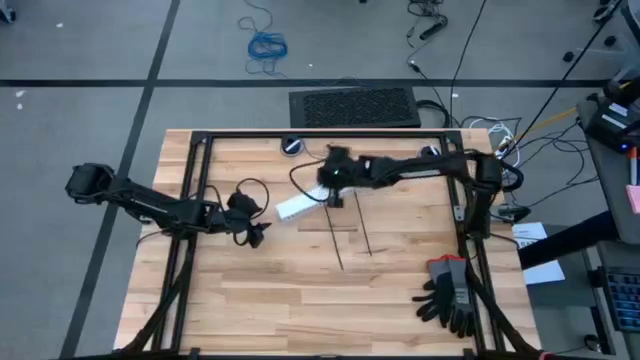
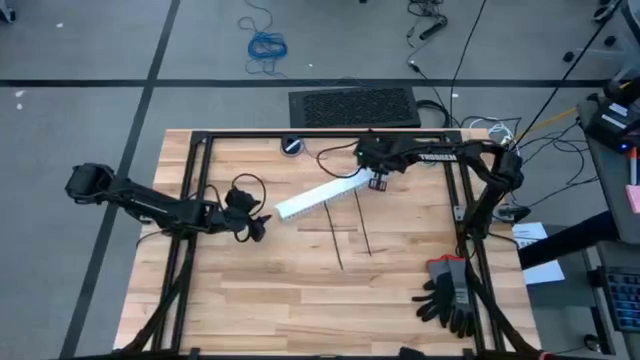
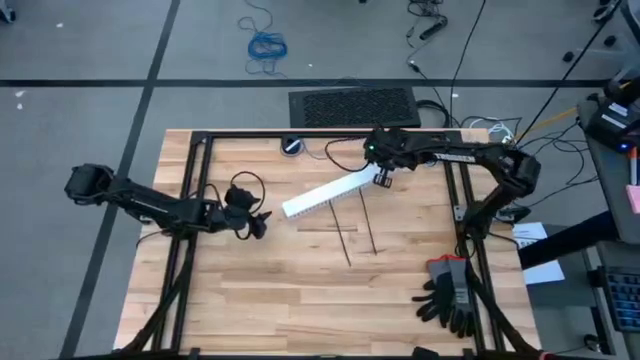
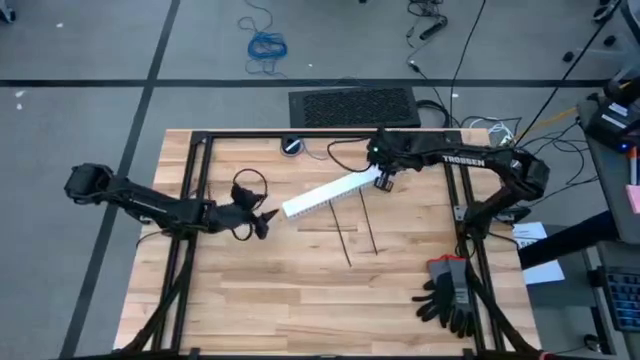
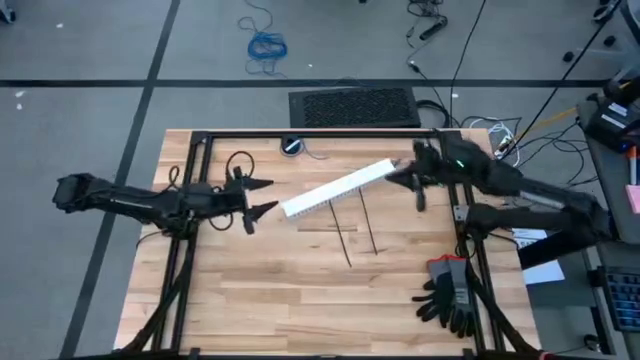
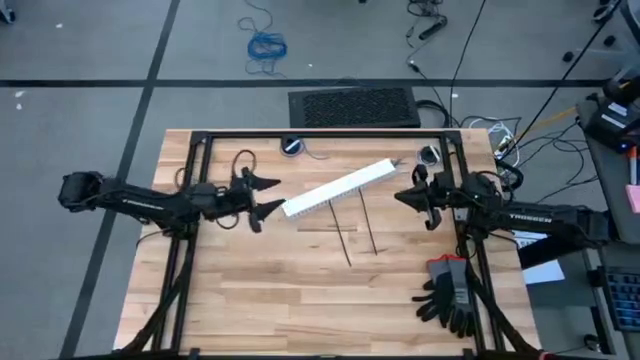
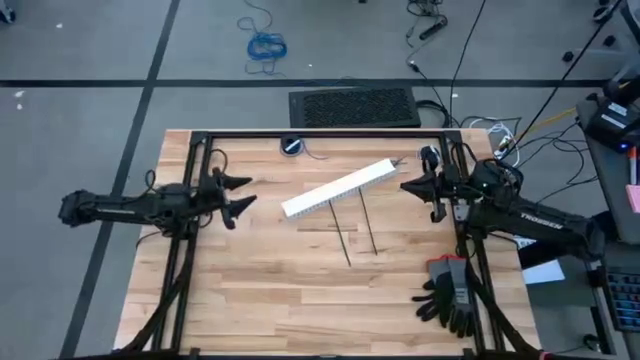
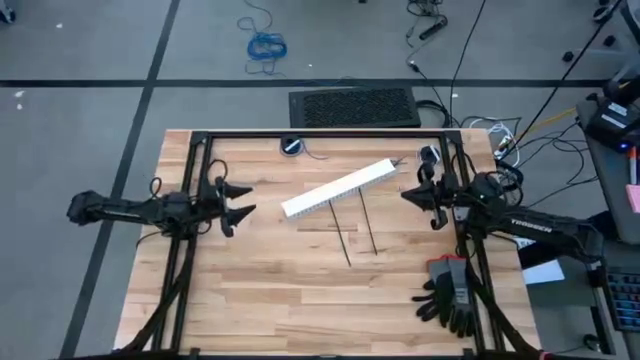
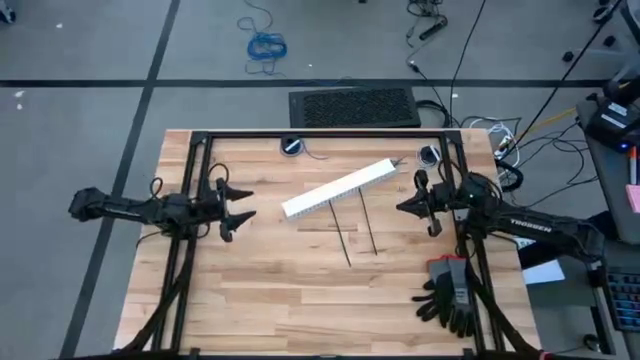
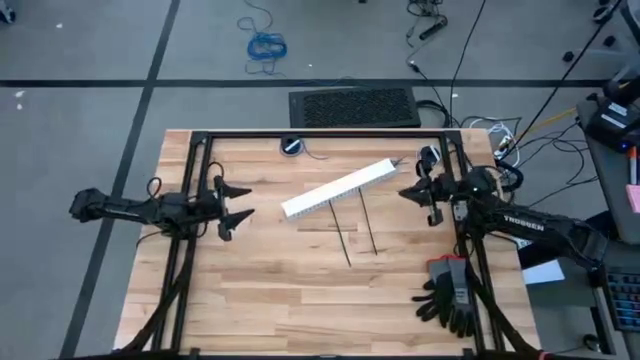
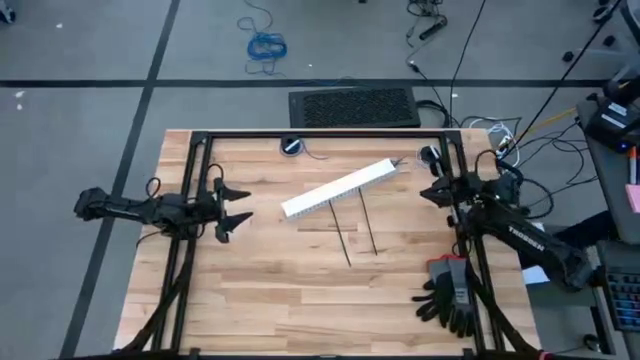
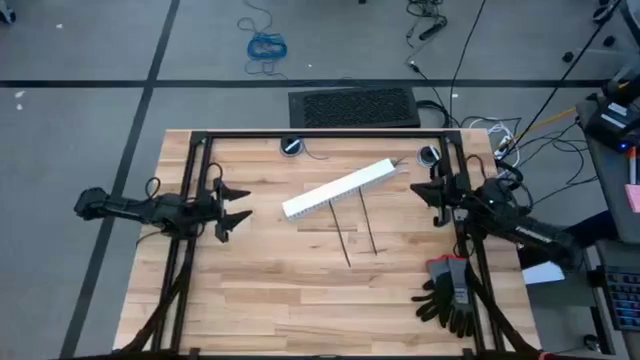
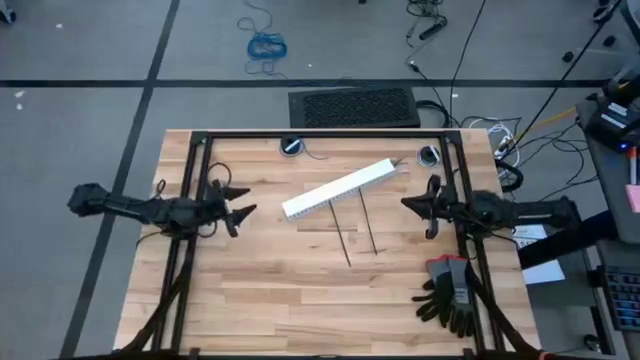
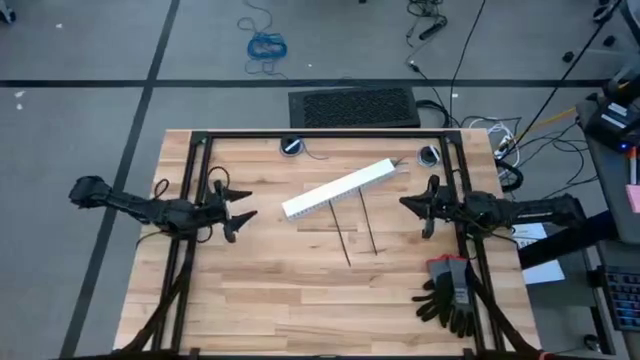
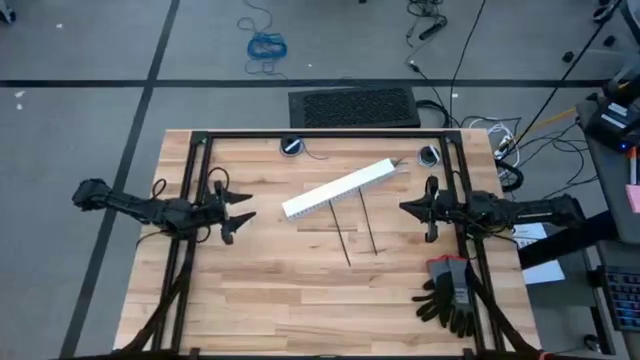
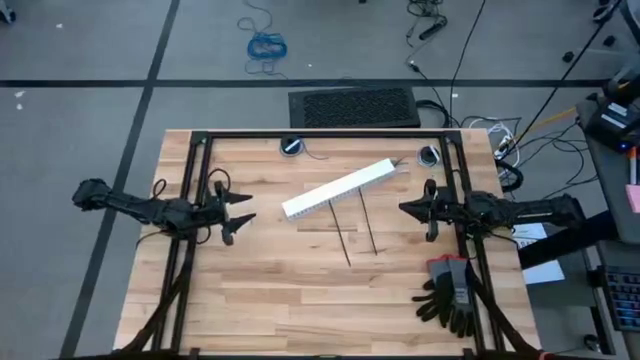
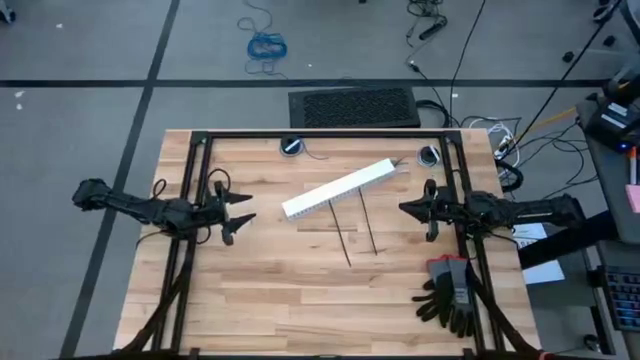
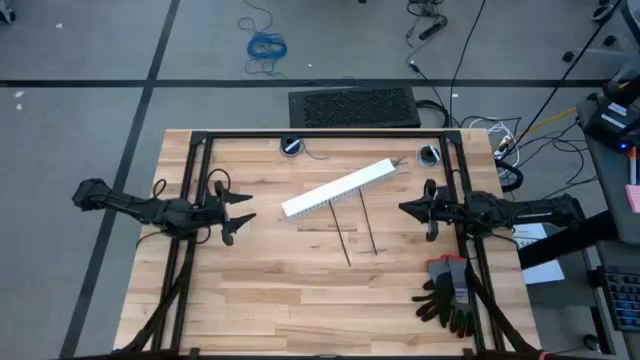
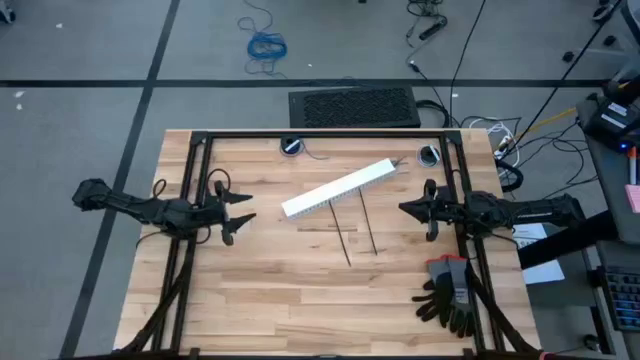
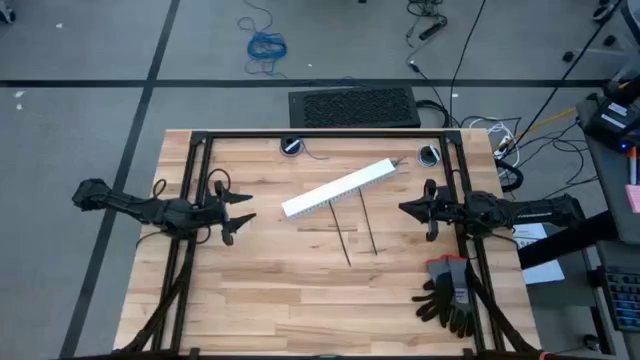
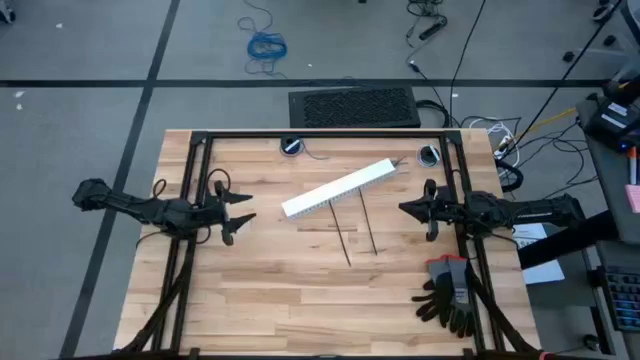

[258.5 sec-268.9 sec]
Task: Ziptie cables
Return to home position

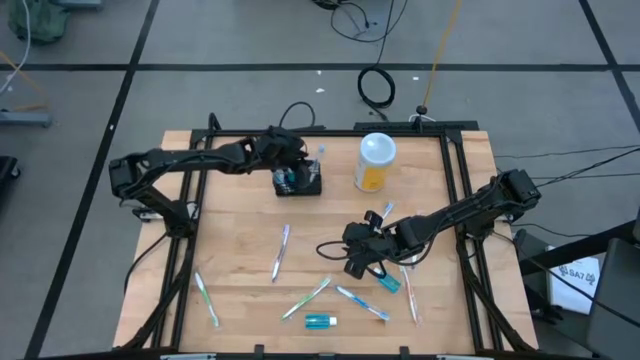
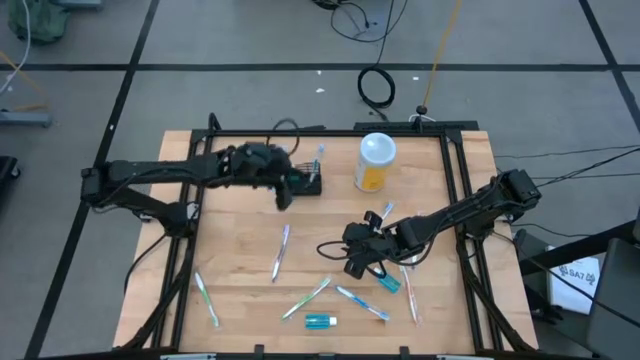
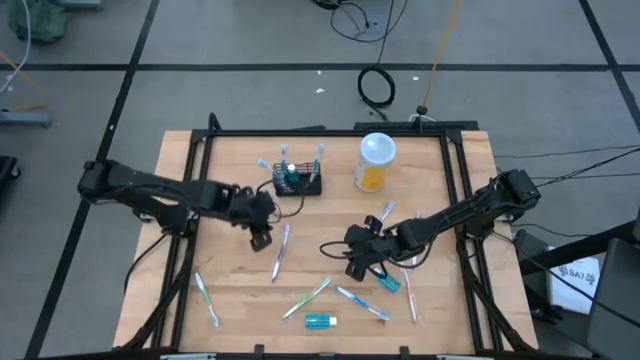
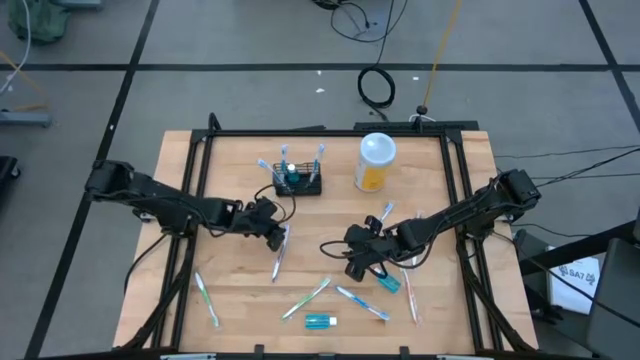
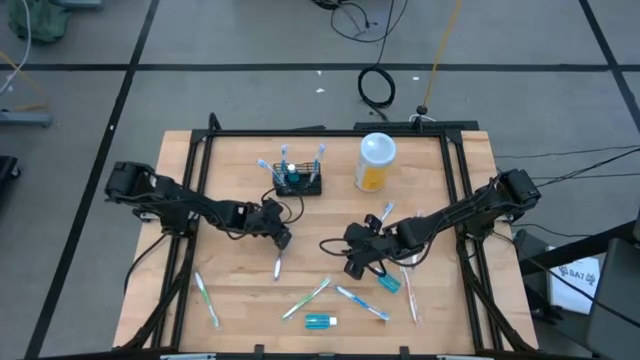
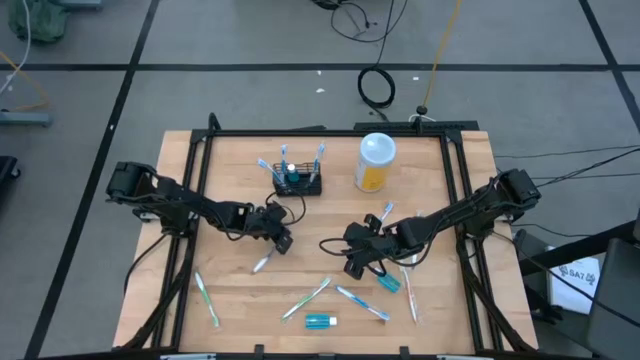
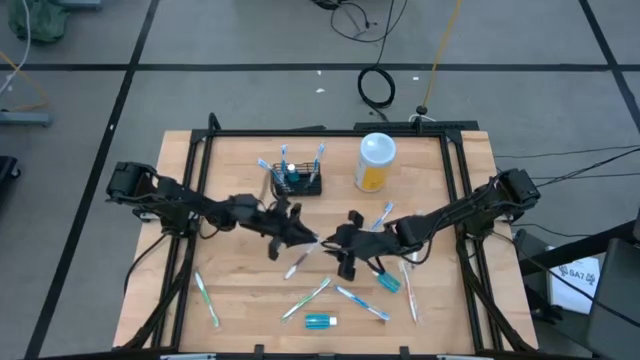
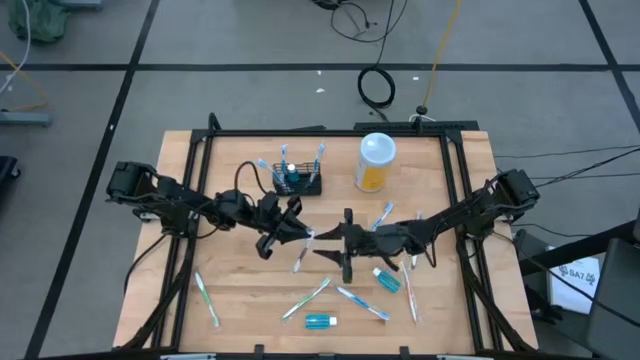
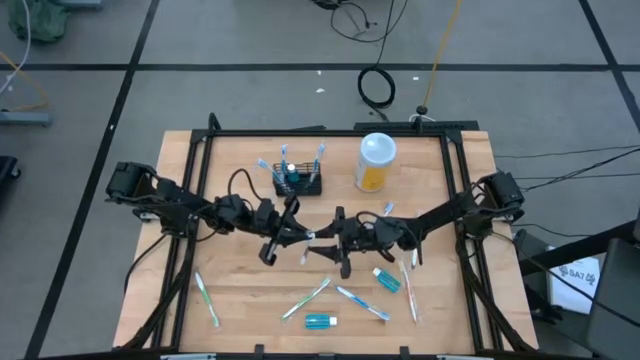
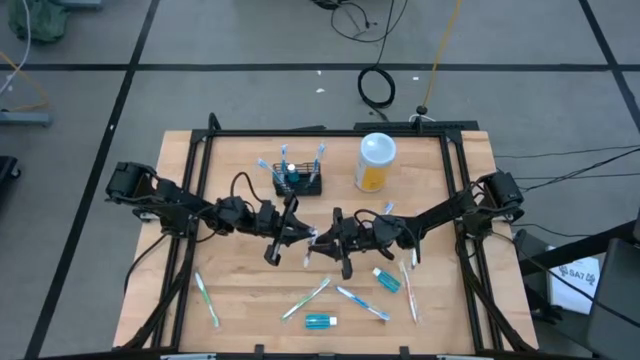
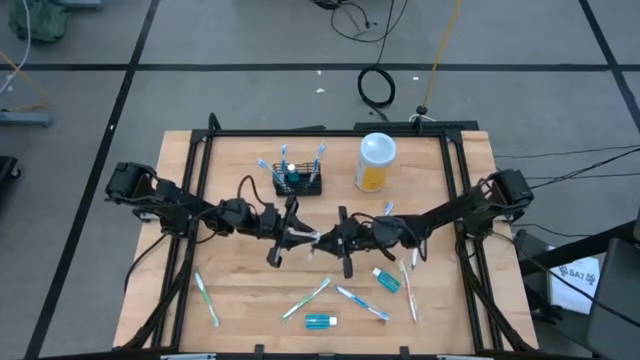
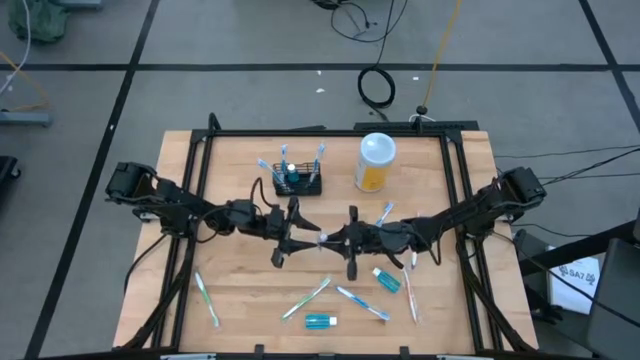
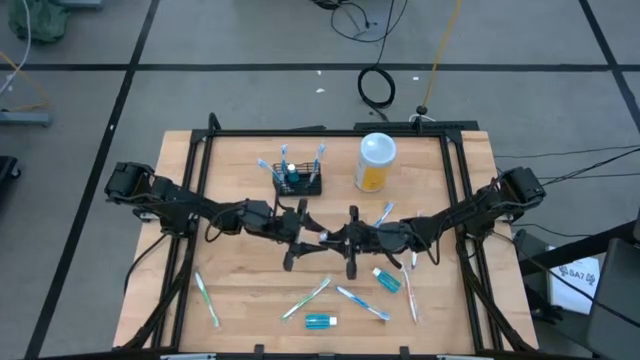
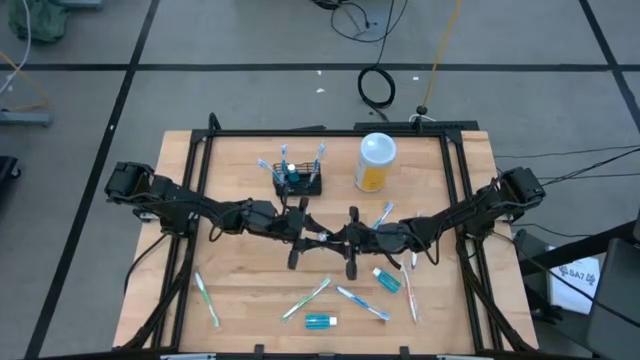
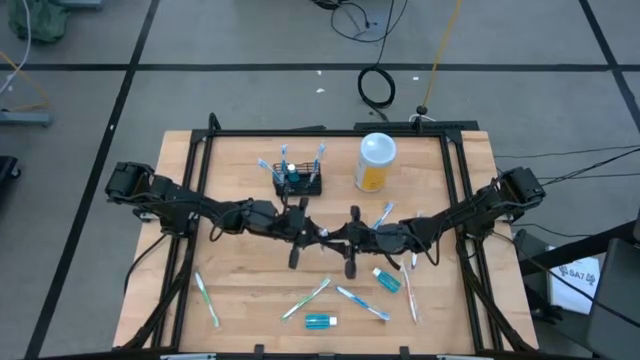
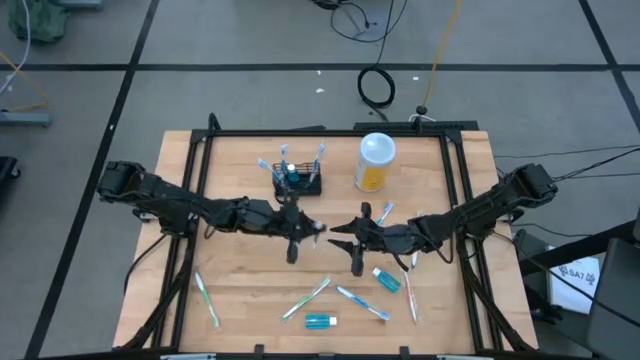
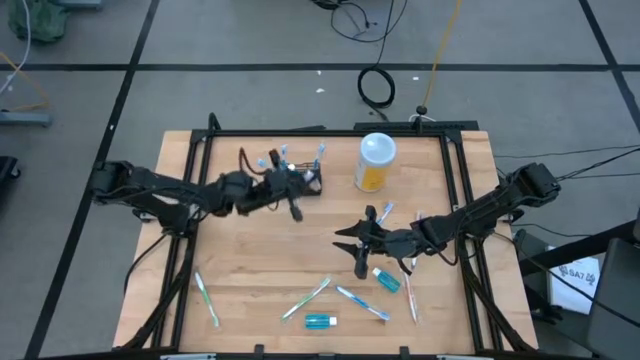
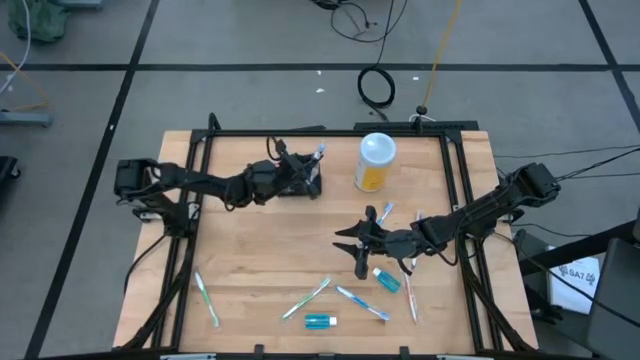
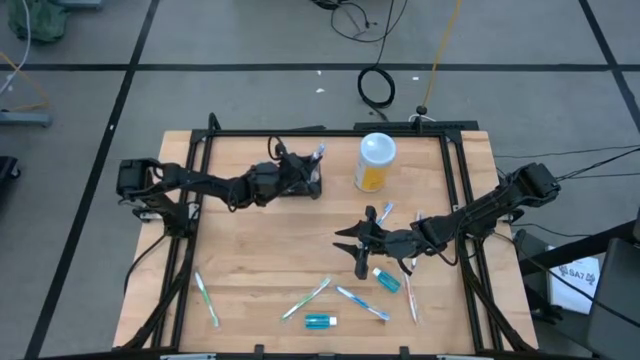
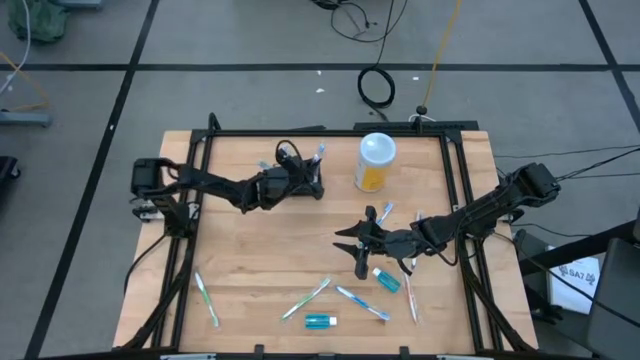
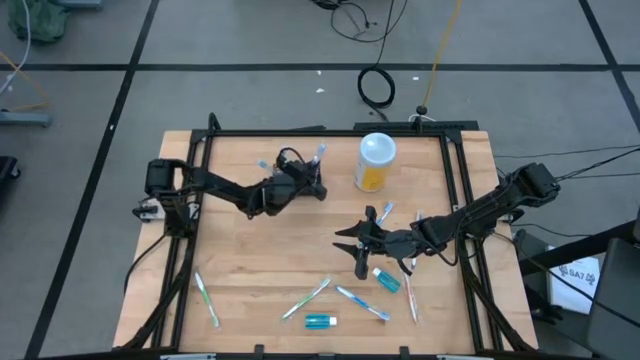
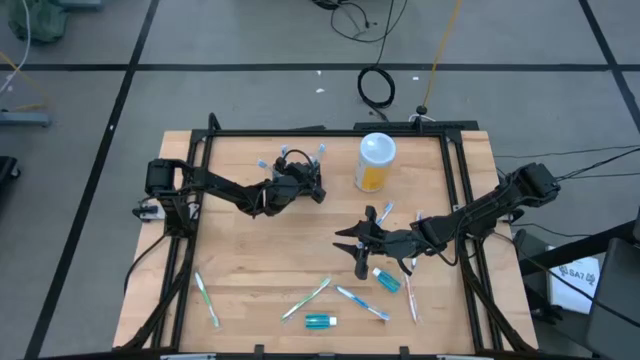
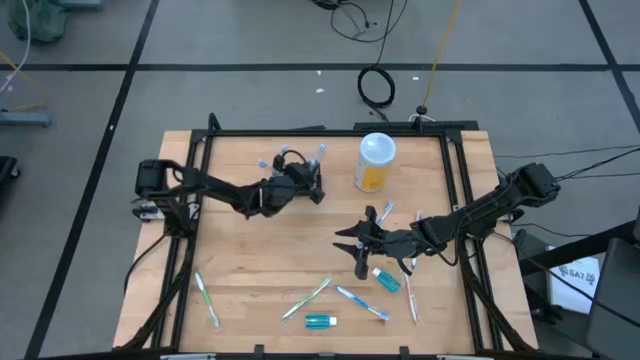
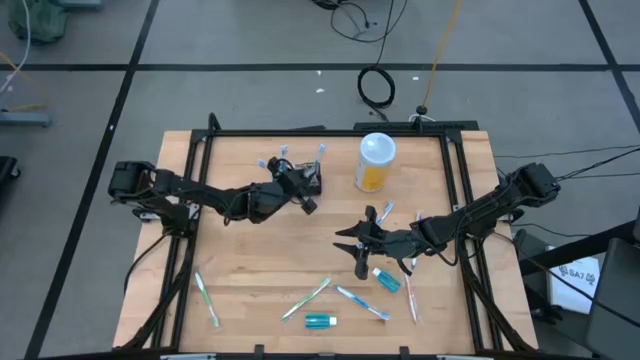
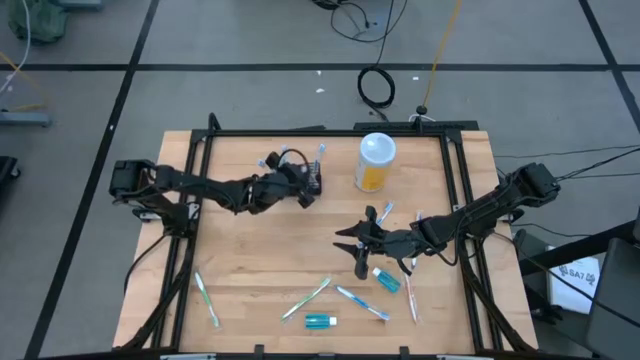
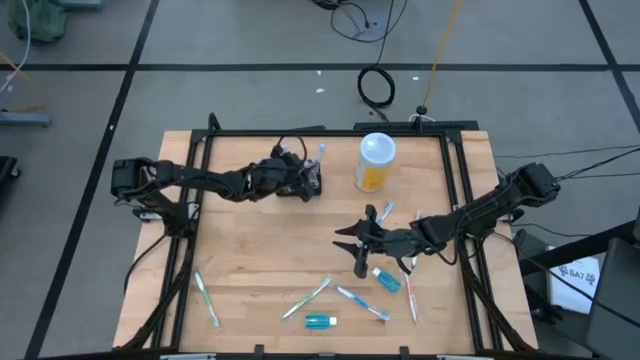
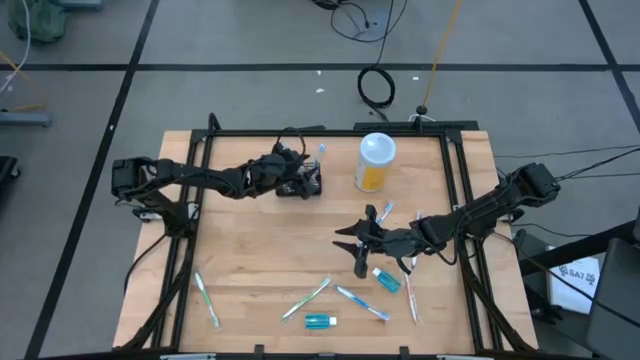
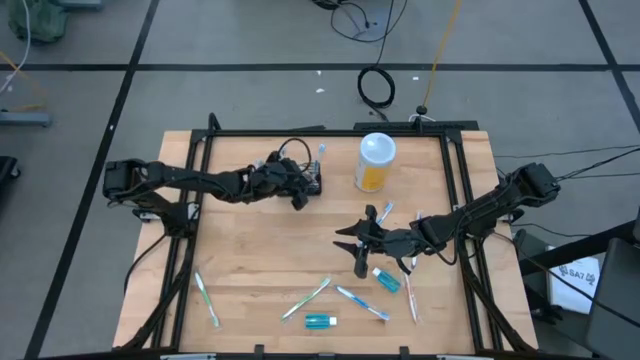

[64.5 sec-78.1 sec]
Task: Pick & Place toothbrushing station
Put the purple toothbrush into the black mesh organizer
